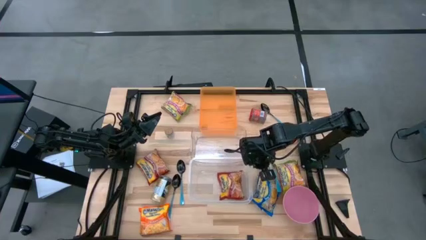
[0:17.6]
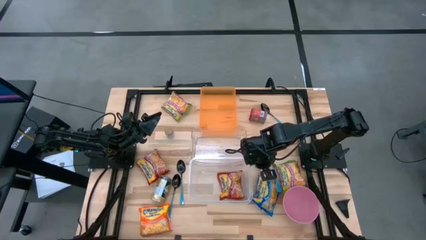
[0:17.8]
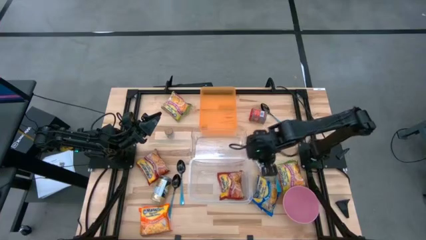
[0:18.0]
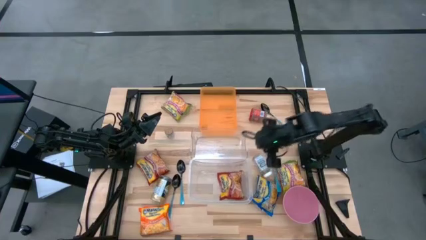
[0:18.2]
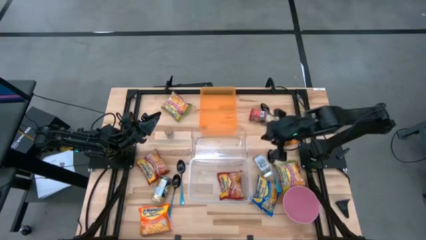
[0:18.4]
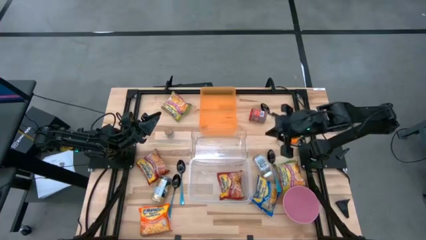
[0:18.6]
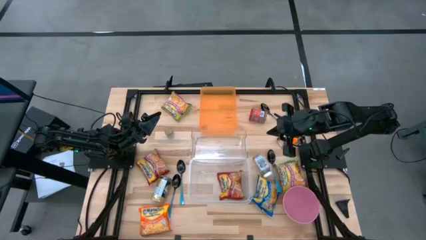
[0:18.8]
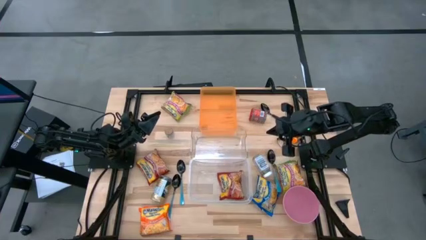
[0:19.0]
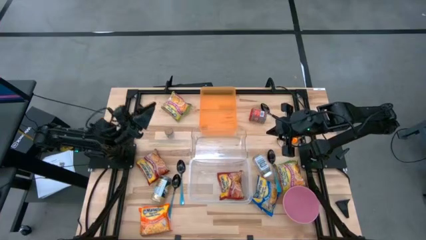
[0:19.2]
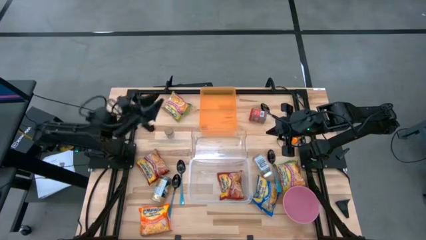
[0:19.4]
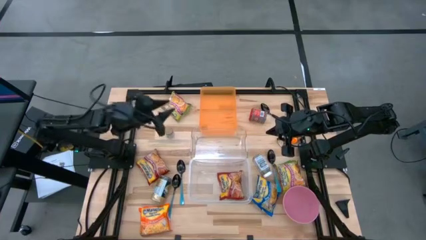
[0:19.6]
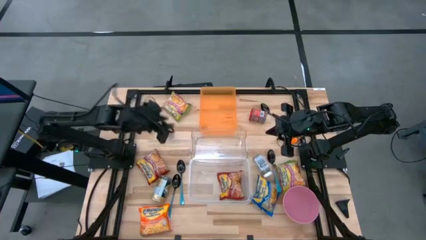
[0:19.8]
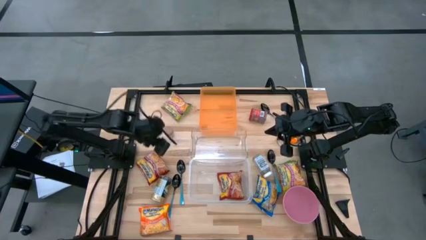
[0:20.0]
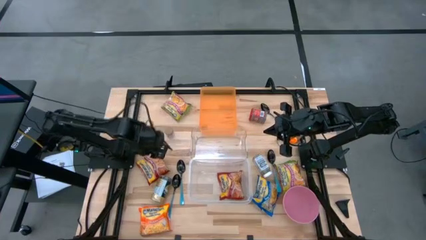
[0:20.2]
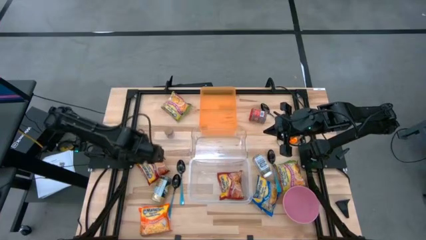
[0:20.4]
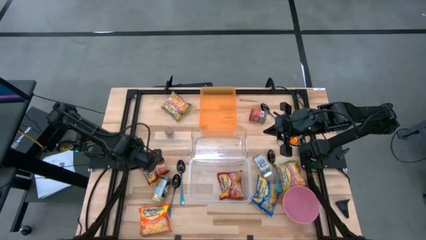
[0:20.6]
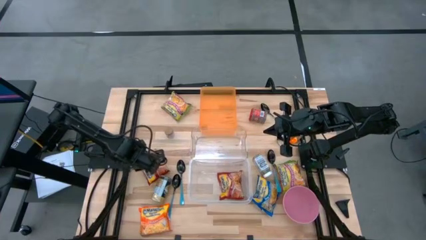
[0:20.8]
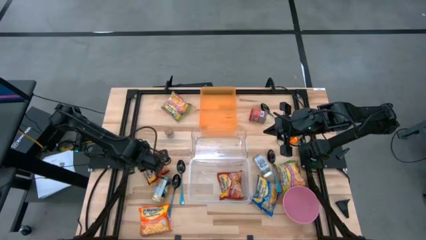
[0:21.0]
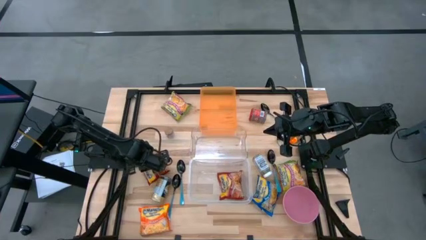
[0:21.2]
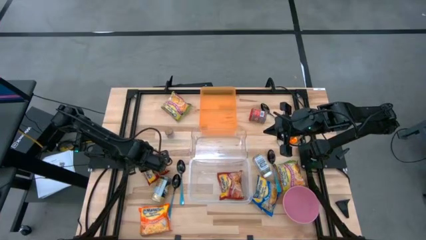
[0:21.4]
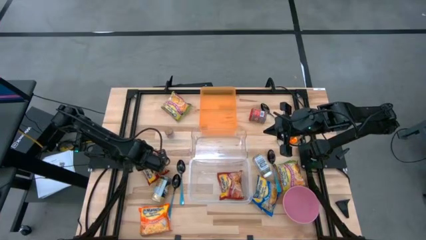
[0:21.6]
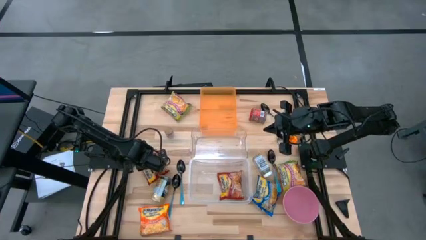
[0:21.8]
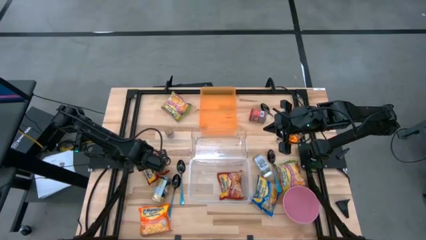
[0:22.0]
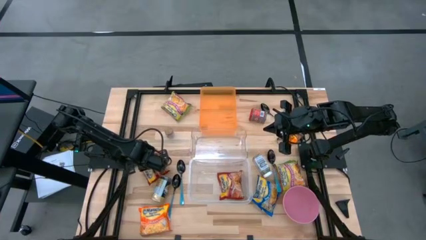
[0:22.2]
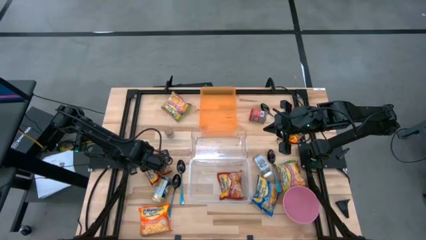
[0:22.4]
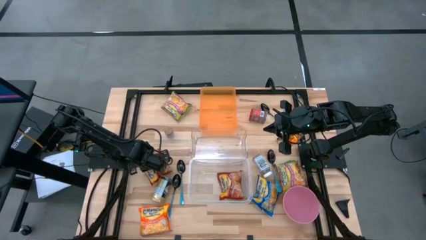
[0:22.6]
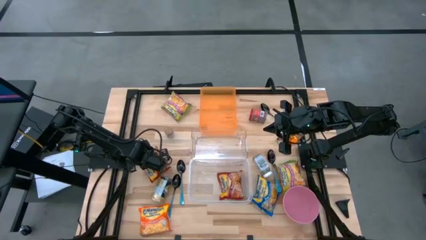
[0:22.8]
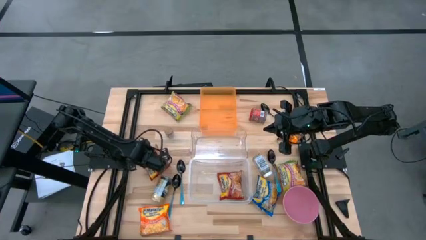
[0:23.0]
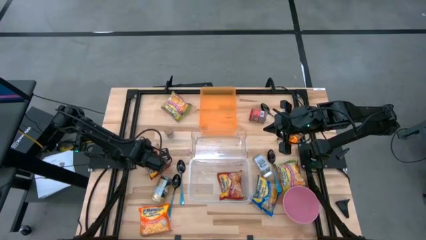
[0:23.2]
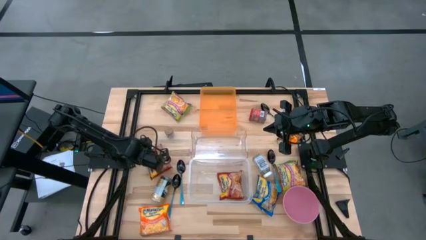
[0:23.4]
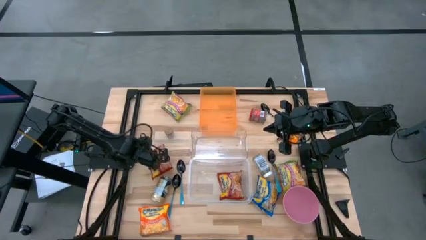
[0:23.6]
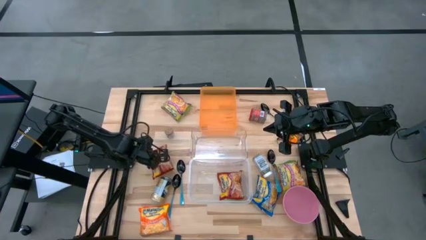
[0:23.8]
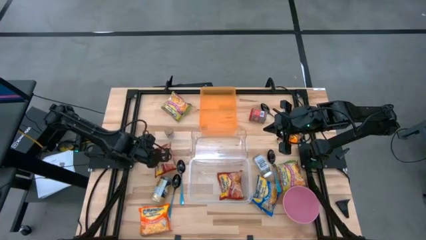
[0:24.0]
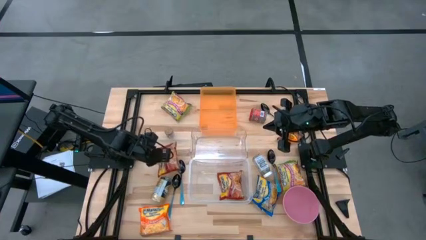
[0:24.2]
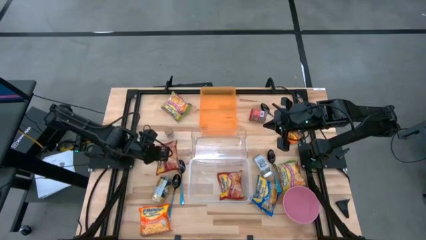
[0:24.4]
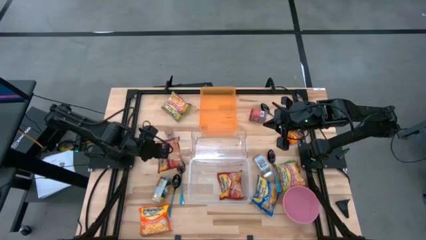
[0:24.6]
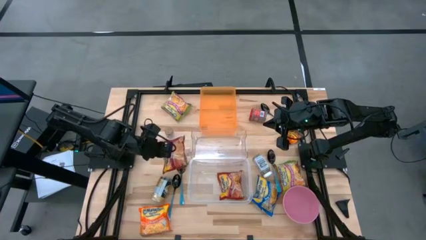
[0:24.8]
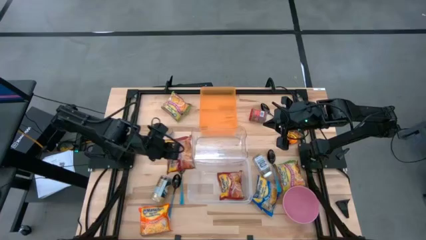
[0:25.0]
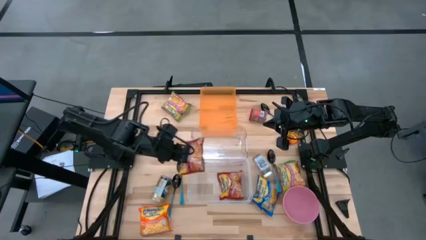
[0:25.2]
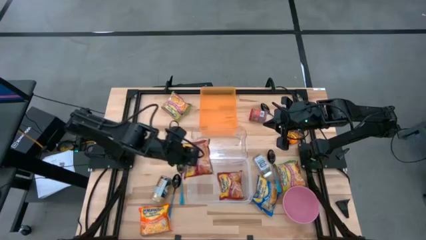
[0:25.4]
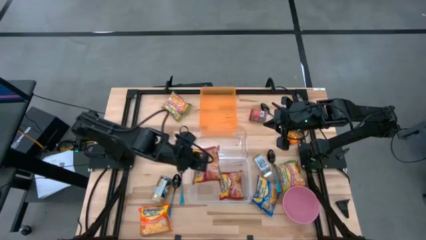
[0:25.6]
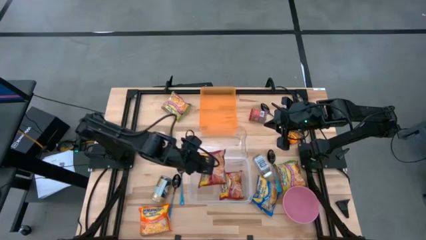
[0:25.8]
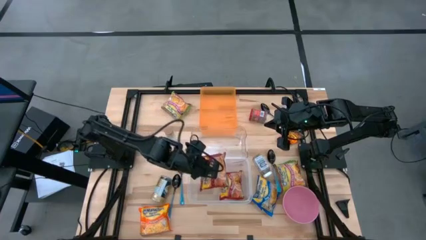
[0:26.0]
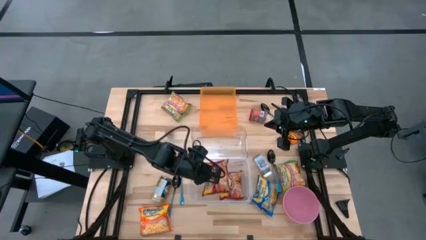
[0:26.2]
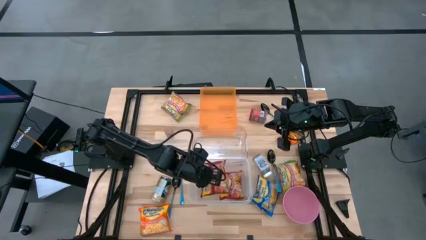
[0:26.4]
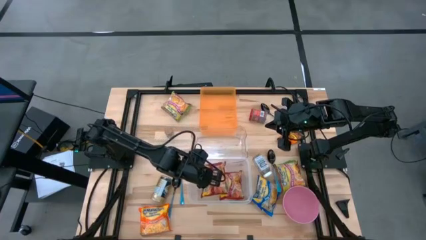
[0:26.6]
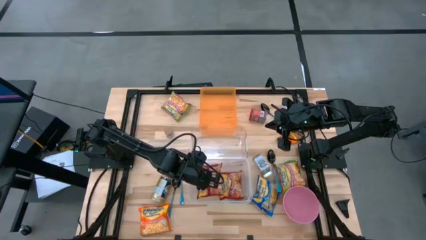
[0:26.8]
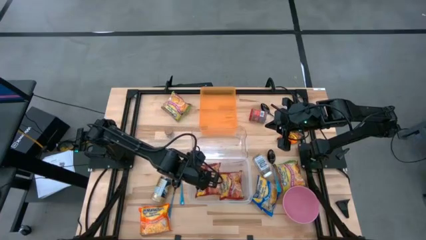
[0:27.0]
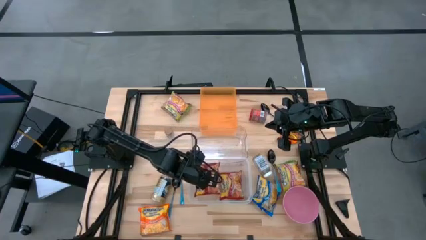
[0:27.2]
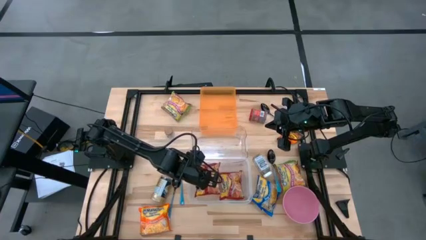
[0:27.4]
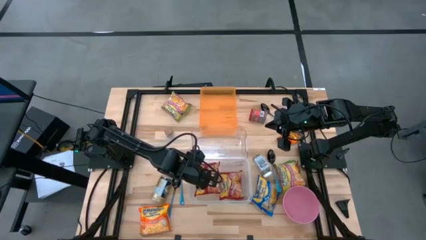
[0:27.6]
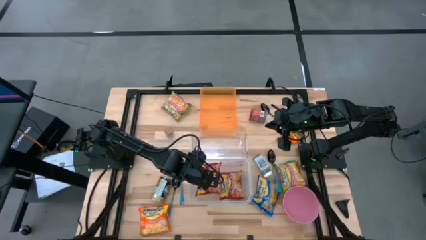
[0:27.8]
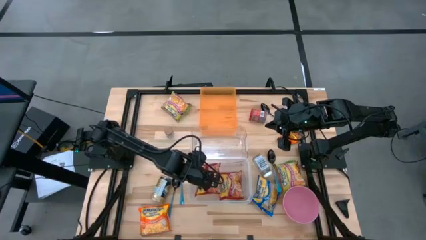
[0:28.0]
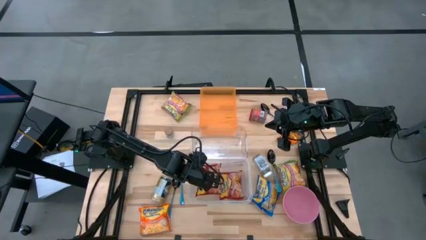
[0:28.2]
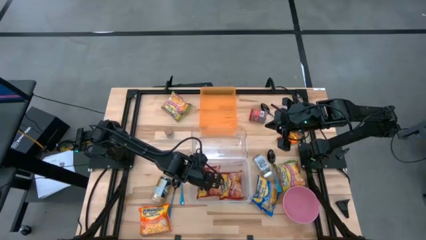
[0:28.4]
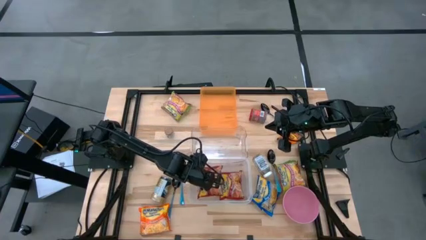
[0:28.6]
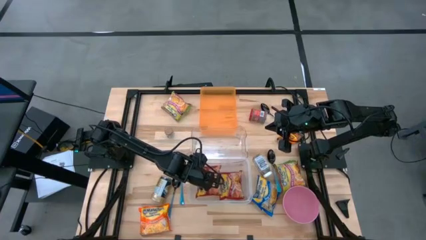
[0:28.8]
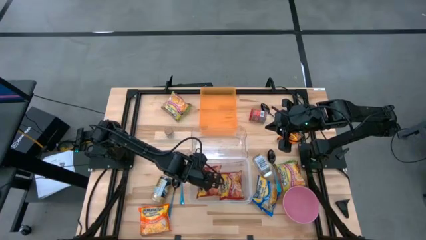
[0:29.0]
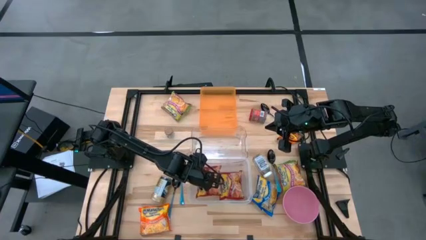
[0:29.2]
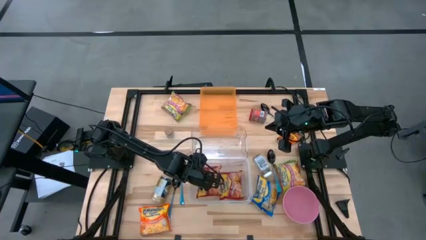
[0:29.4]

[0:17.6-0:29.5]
Task: Pick & Place Food Item
Put the red noodle pack into the white transparent bin

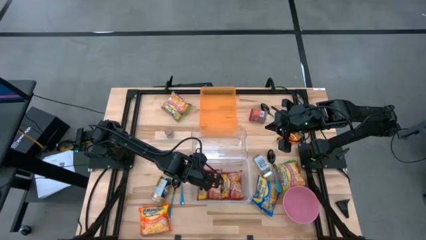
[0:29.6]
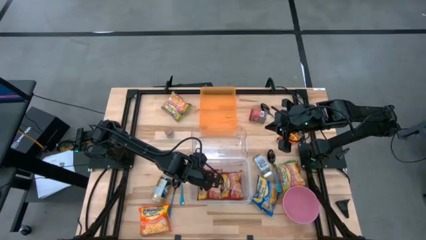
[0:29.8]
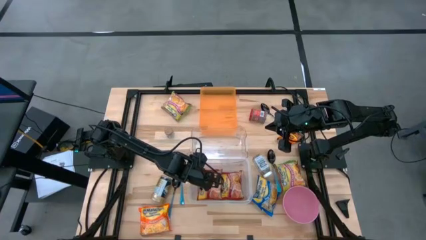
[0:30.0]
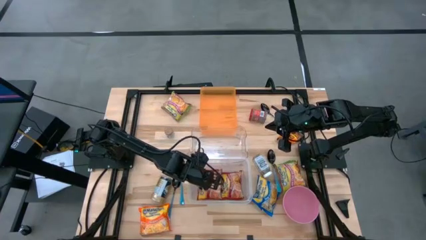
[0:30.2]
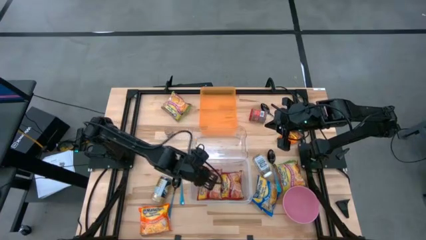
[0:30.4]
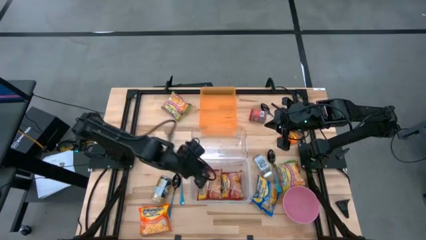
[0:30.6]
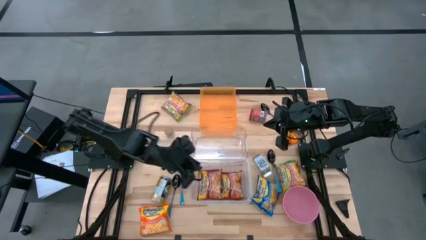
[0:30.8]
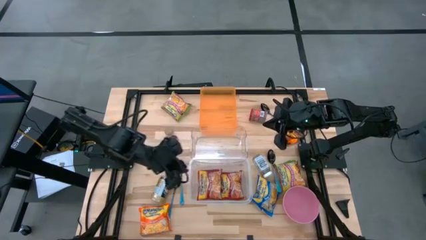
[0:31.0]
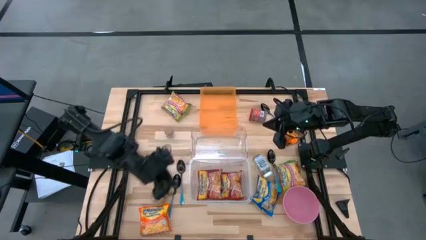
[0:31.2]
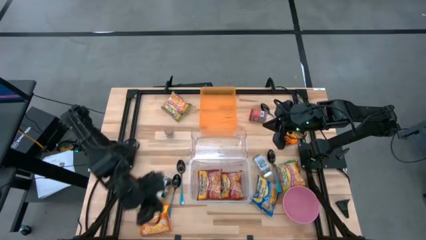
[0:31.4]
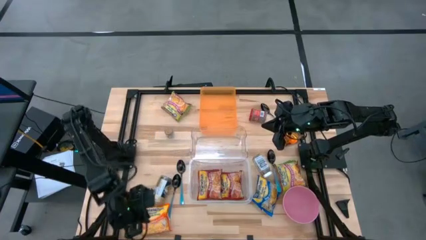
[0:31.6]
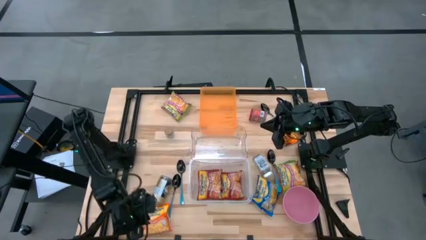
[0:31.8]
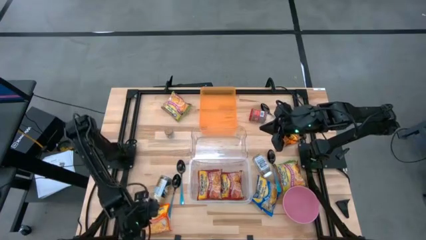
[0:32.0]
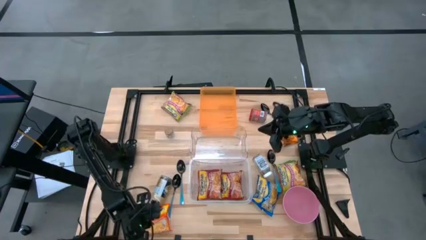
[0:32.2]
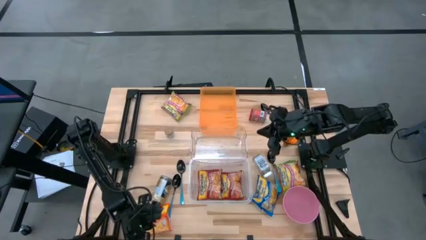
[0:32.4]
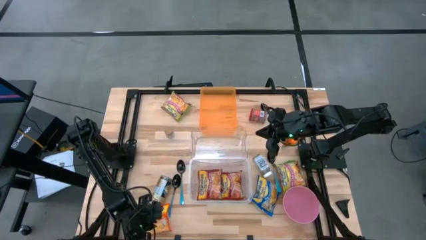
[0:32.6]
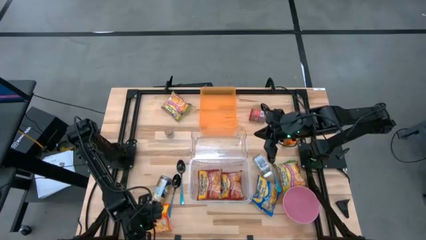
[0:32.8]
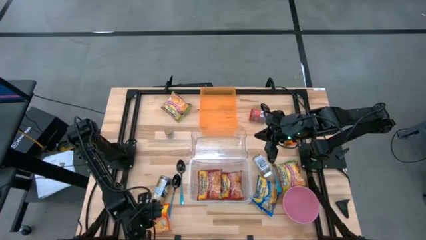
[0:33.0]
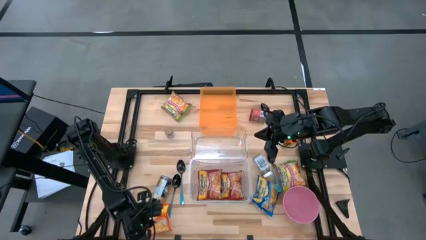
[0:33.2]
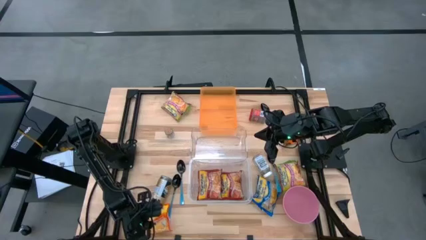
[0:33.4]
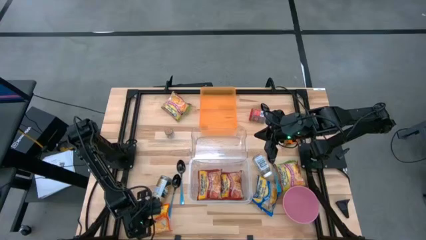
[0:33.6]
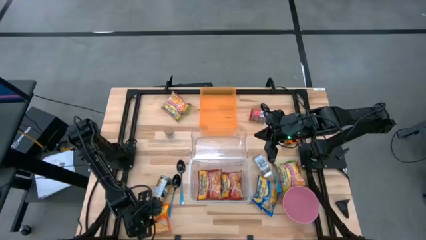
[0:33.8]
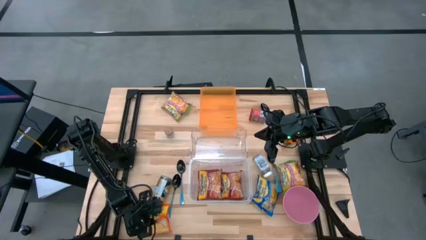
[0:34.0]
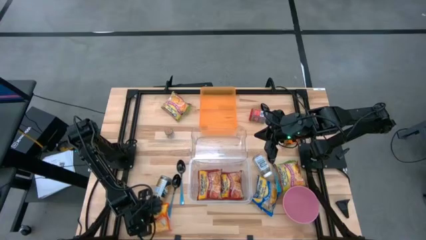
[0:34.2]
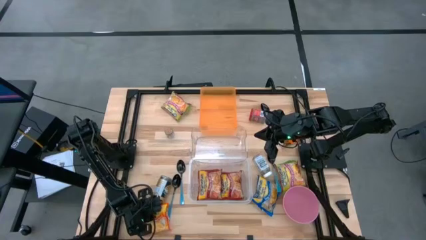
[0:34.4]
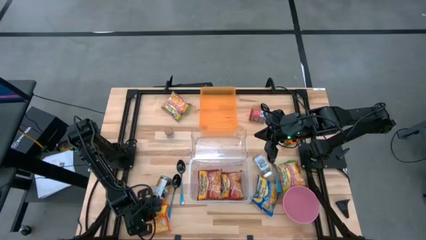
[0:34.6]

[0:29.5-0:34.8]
Put the orange noodle pack into the white transparent bin
